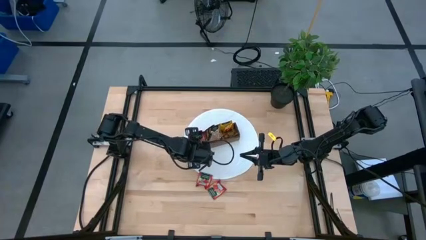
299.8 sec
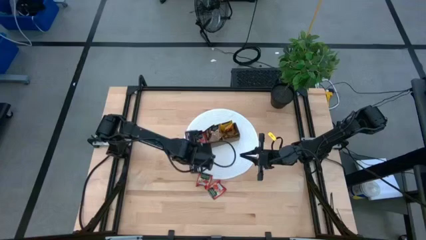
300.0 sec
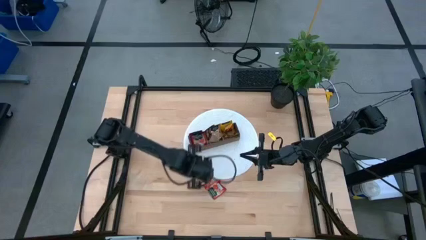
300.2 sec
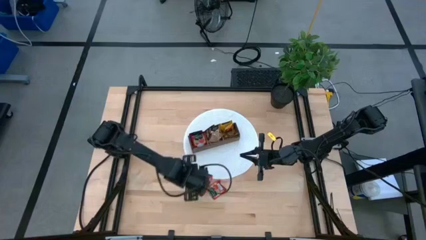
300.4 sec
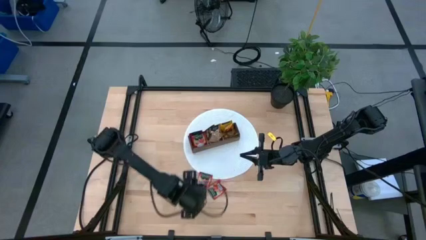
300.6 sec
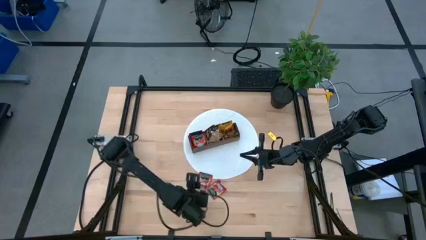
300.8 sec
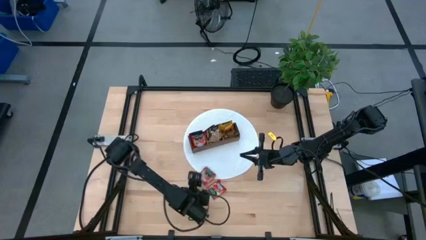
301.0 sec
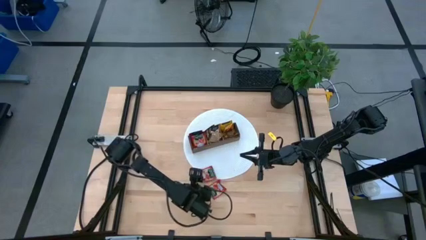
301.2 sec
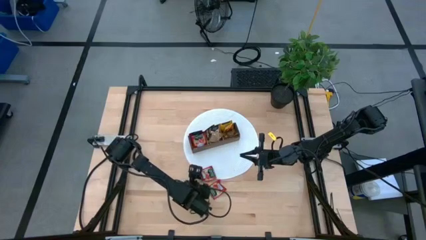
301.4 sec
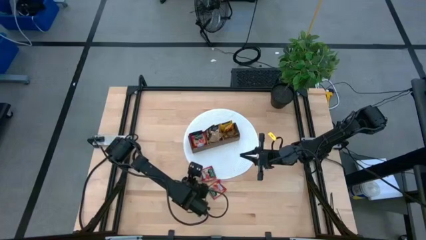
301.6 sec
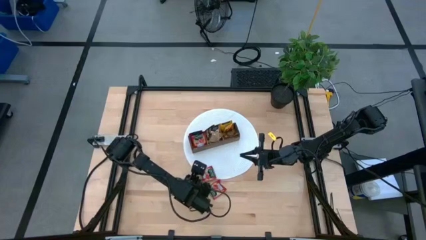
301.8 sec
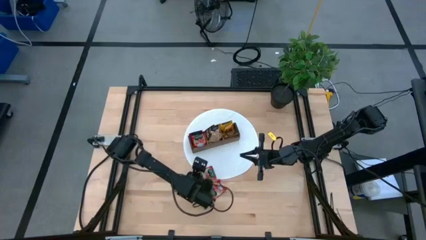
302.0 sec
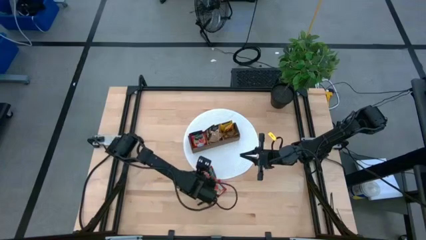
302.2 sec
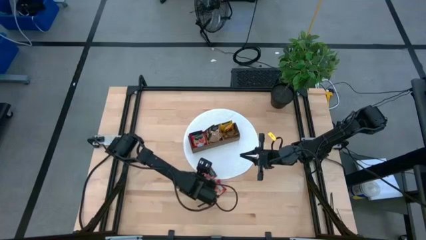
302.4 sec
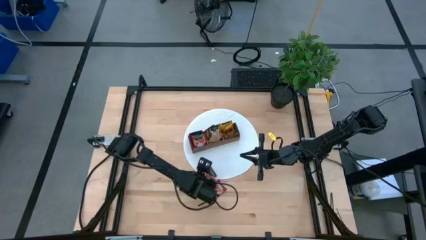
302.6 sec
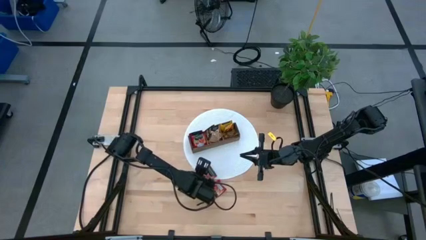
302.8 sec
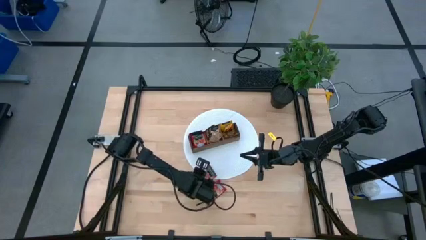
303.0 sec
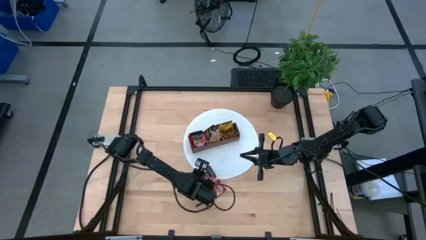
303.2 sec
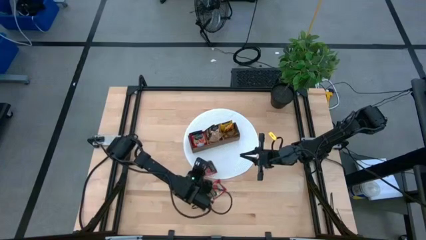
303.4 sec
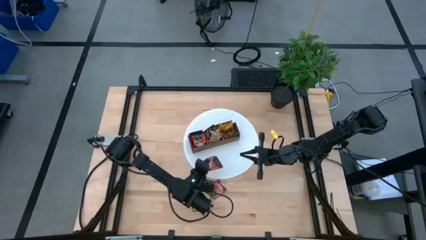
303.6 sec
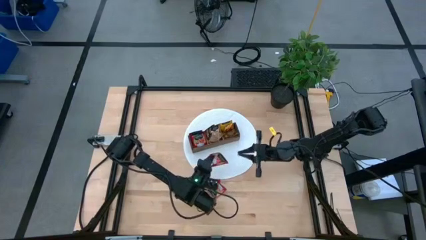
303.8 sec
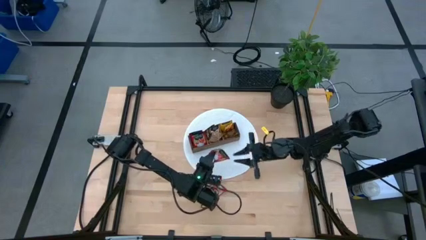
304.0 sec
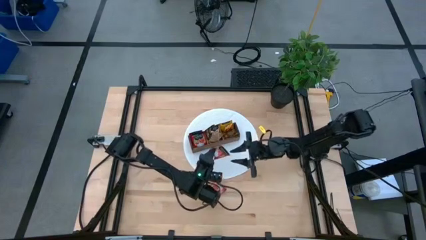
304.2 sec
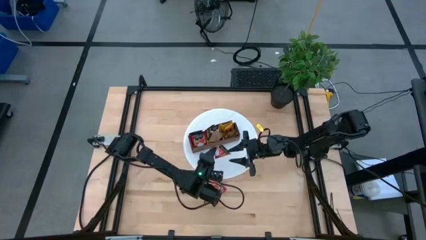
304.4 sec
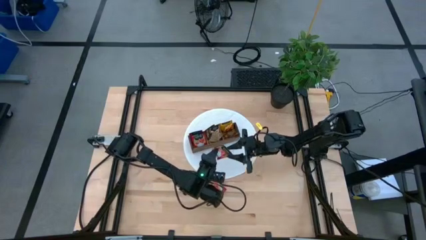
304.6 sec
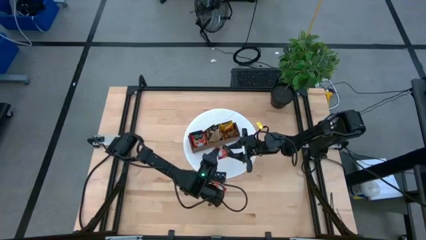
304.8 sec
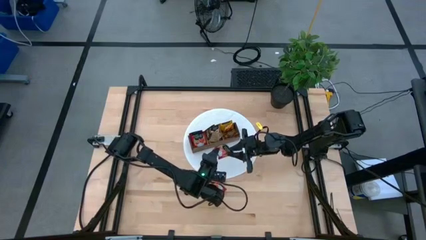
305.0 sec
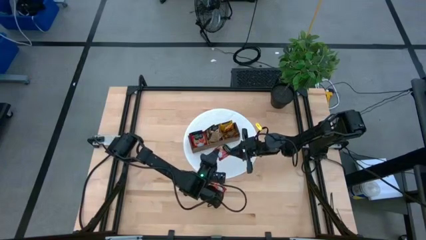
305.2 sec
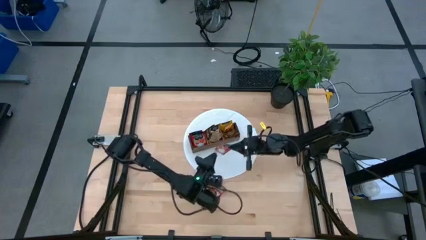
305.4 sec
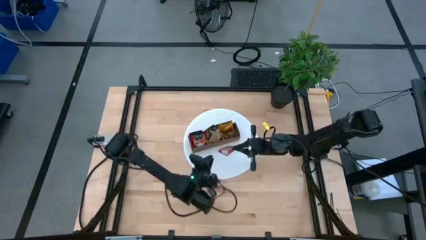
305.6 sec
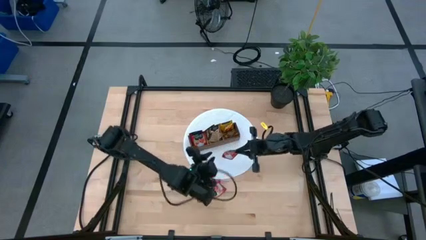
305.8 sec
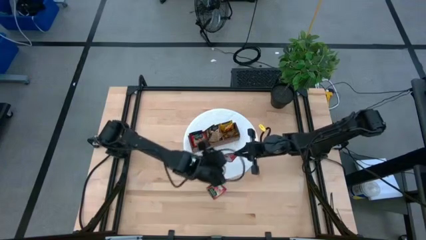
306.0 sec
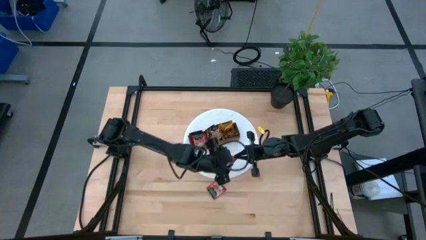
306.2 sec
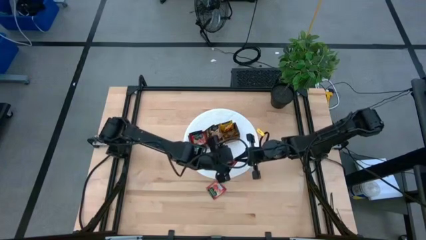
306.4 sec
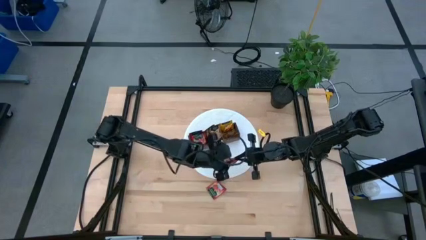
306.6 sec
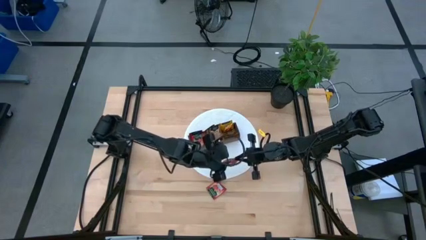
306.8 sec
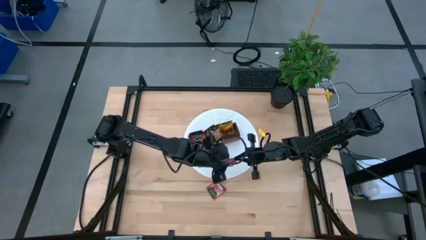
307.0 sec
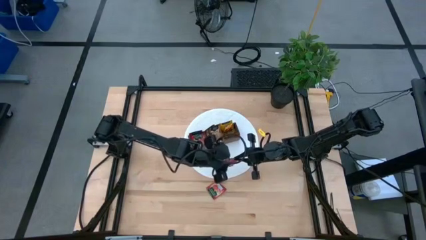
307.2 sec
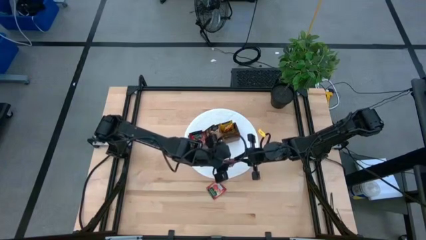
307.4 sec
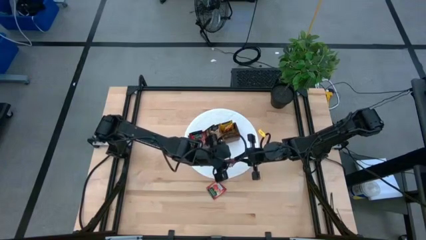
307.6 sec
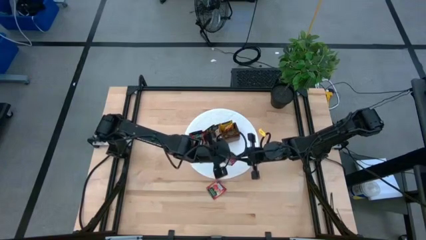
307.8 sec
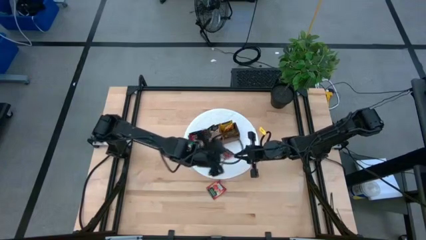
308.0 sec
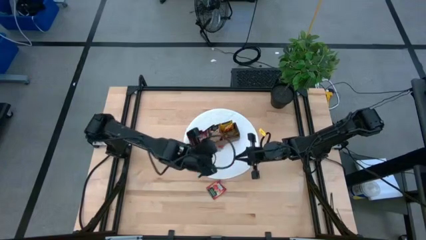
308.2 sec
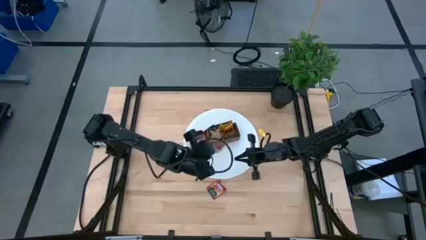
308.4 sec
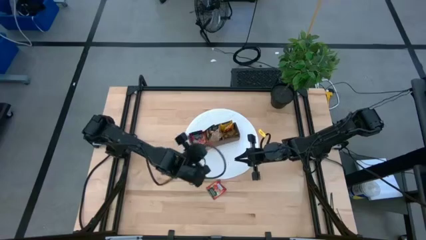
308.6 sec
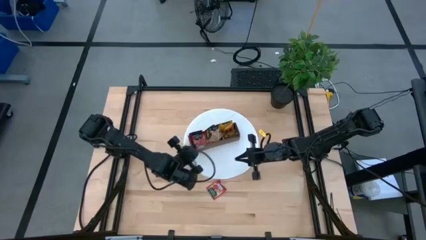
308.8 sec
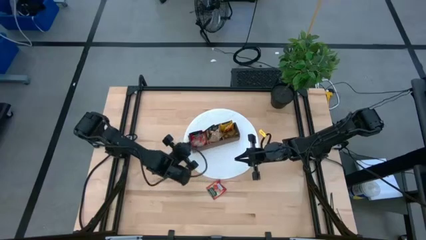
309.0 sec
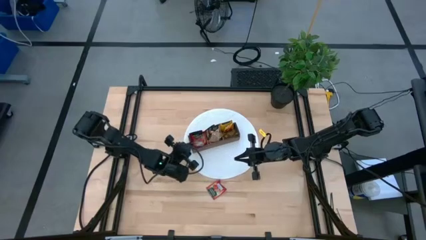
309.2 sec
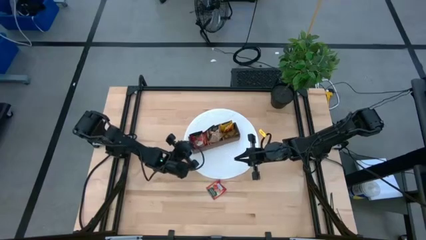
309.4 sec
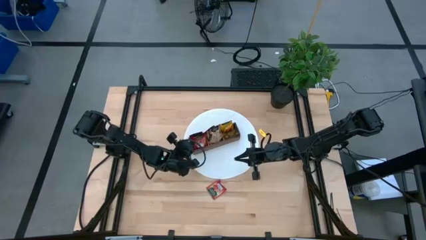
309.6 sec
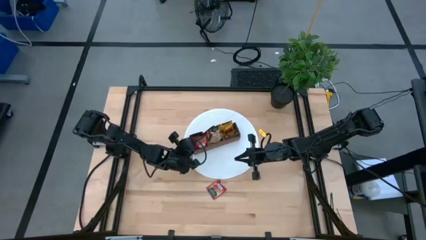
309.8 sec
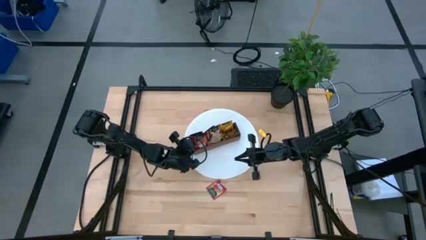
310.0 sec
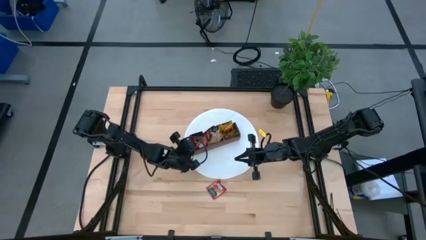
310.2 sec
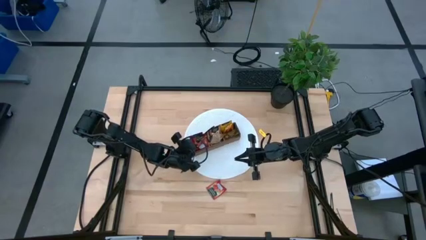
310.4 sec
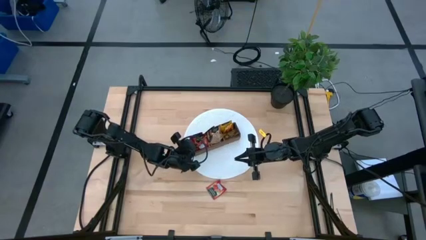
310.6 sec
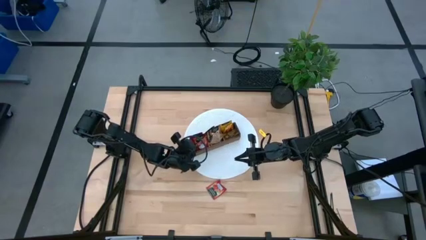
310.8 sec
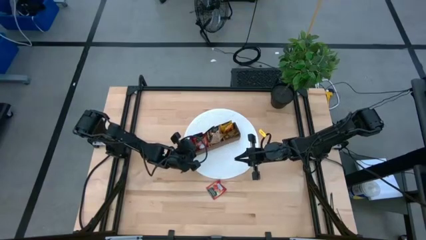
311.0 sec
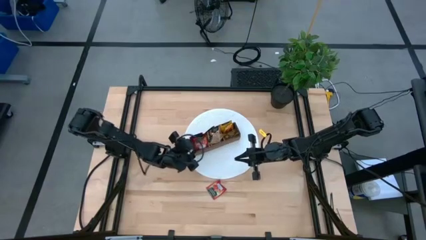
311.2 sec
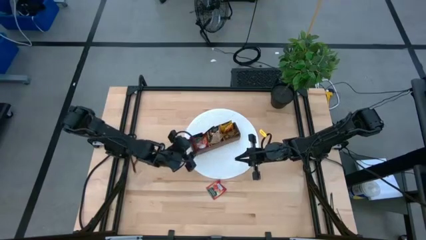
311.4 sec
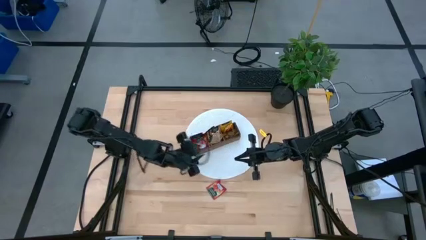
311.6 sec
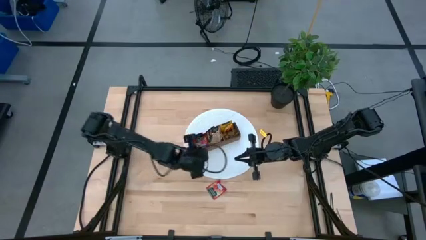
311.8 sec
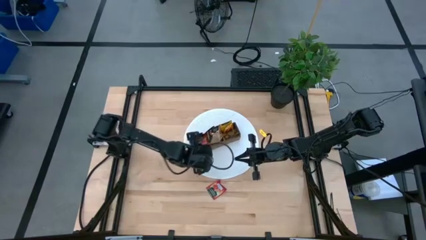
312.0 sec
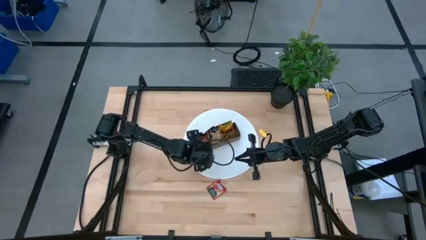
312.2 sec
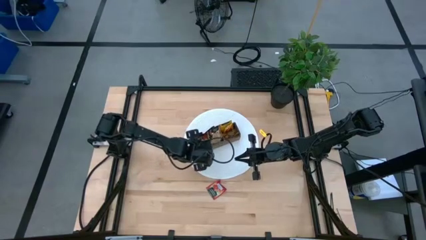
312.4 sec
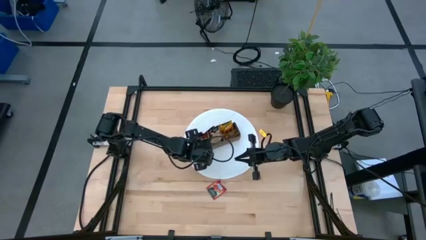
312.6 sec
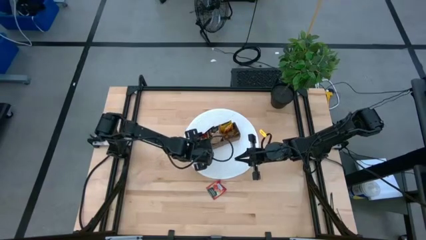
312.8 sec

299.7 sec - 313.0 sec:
Task: Pick & Place Tea
Put the red tea bag into the left section of the wooden organizer

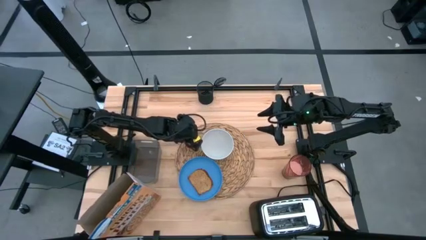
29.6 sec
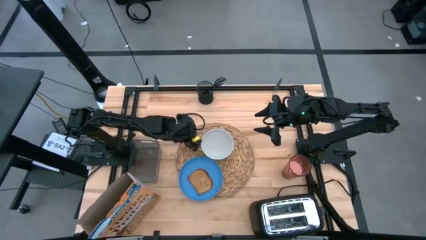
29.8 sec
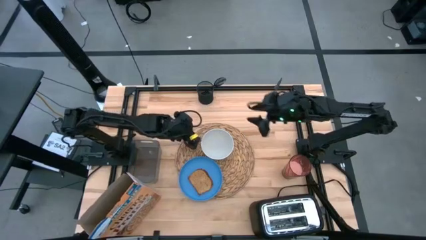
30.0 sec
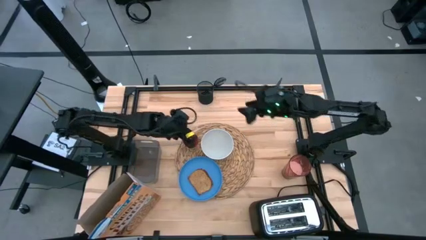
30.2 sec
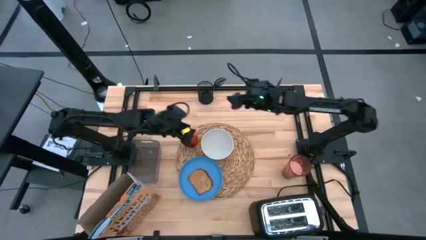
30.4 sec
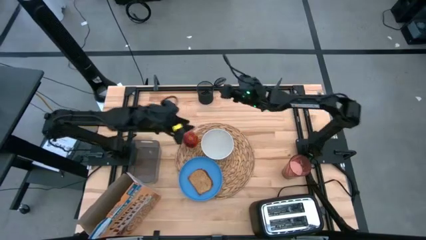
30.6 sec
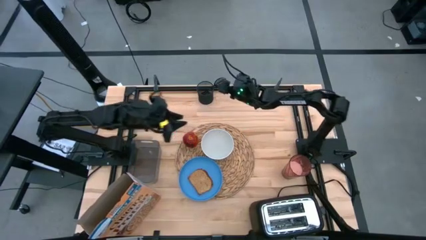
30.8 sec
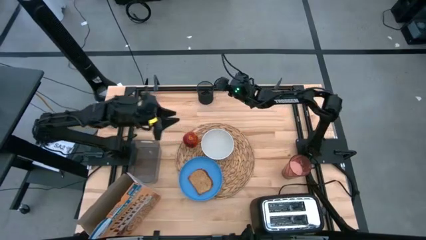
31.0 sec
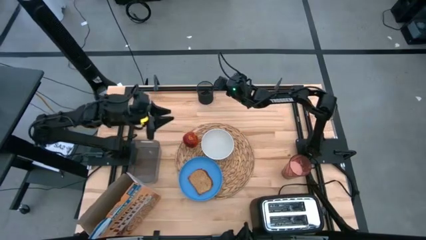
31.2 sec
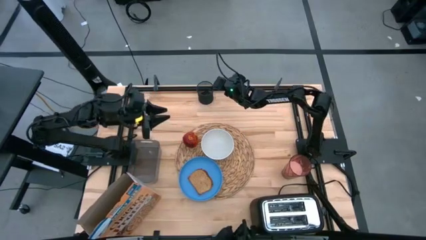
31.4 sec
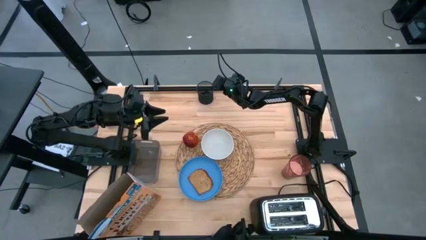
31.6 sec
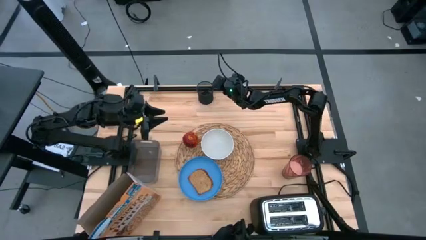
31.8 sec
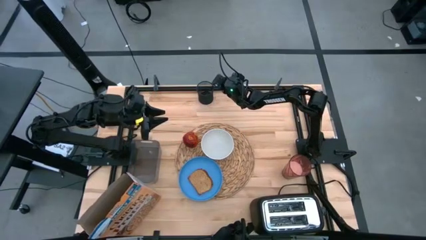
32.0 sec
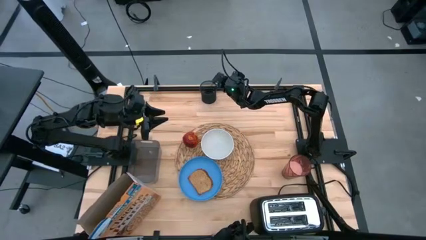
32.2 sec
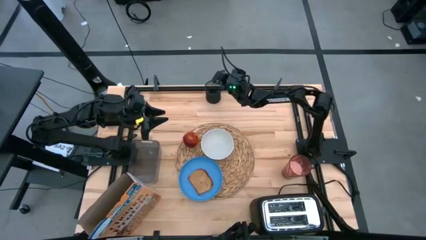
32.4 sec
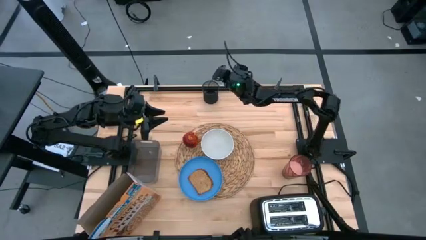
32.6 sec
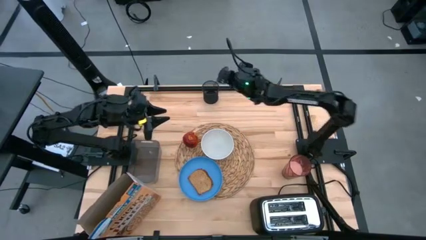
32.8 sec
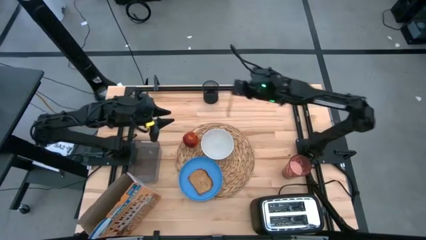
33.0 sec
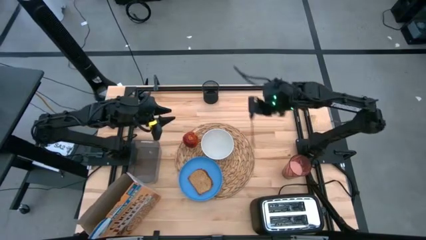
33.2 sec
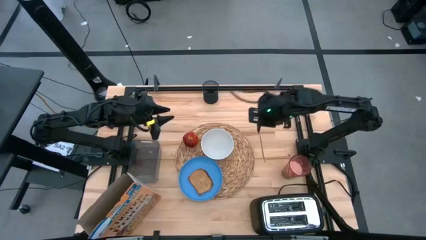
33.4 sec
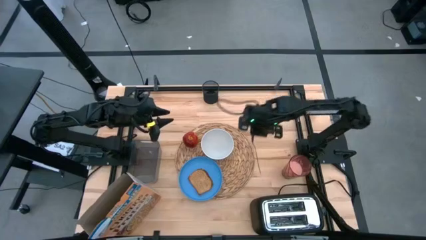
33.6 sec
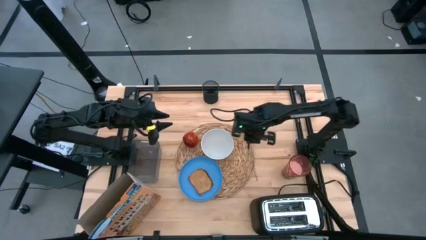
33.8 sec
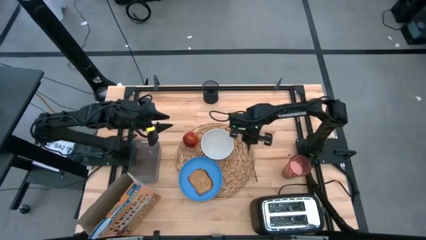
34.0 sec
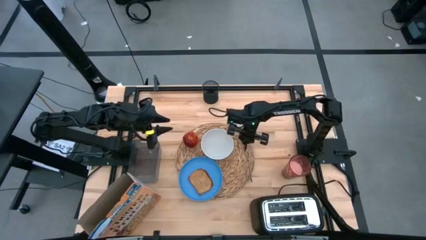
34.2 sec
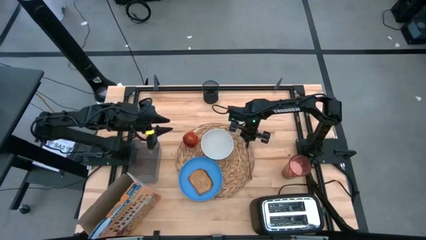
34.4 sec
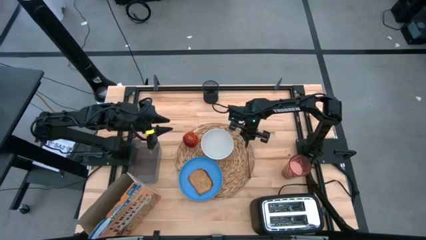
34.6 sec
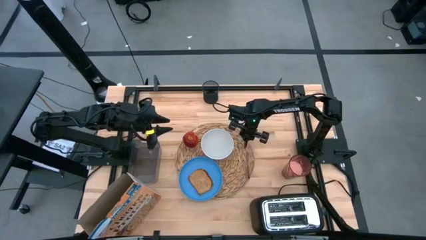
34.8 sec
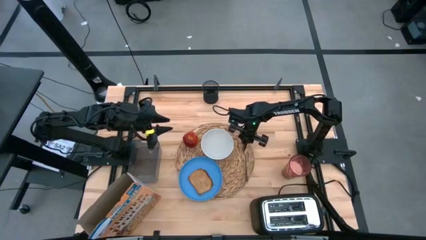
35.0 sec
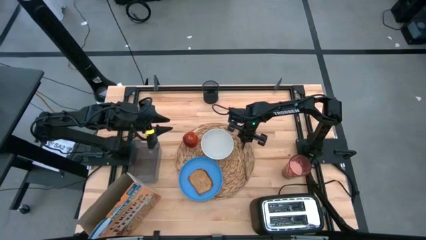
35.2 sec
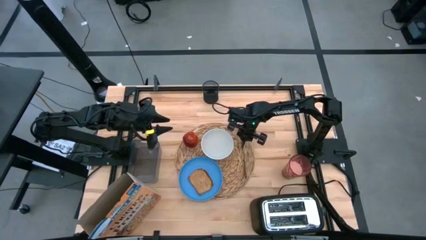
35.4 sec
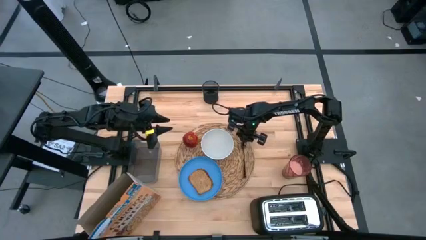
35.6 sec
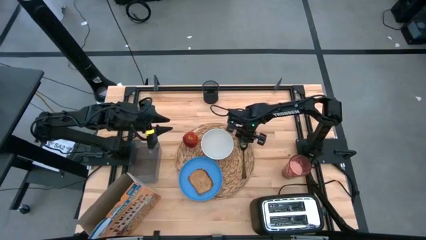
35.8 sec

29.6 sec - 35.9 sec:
Task: Arrange a breakfast setting
Put the spoon on the brown placemat to the right of the white bowl
